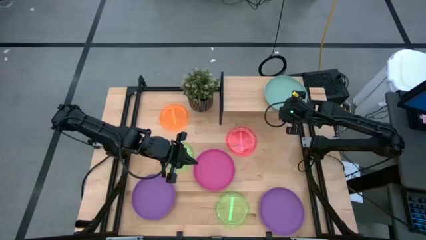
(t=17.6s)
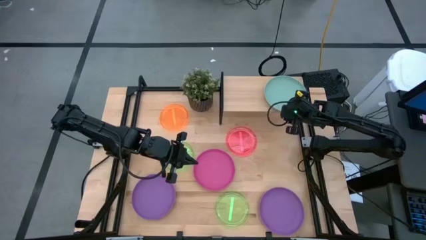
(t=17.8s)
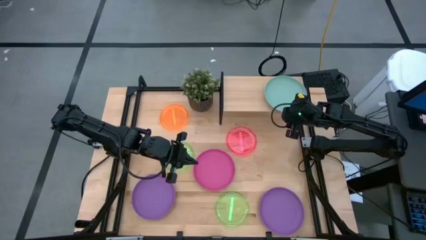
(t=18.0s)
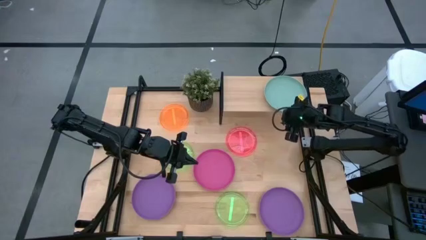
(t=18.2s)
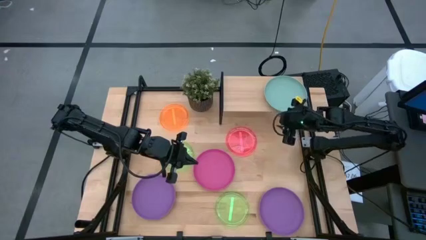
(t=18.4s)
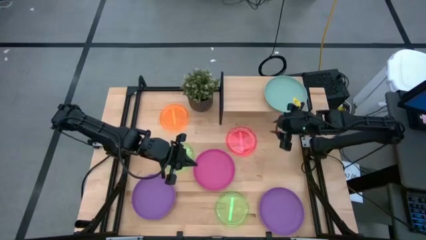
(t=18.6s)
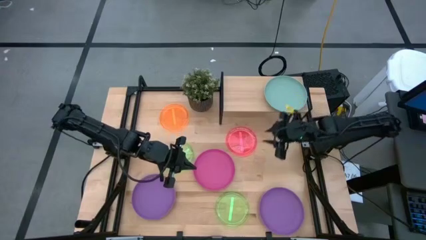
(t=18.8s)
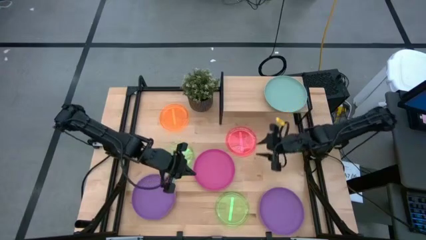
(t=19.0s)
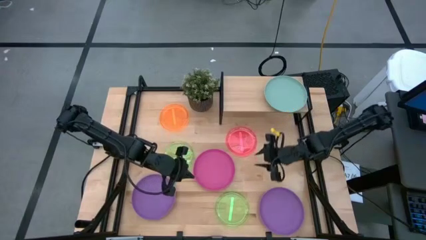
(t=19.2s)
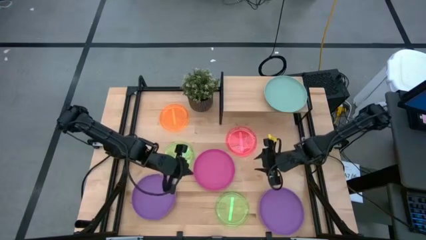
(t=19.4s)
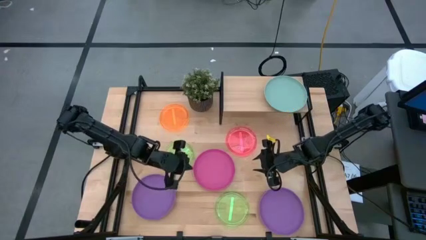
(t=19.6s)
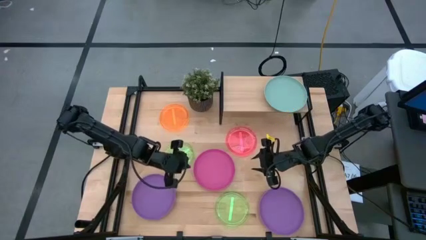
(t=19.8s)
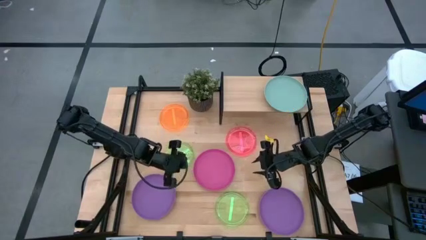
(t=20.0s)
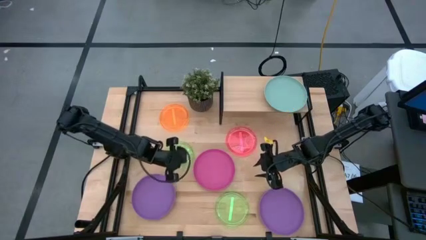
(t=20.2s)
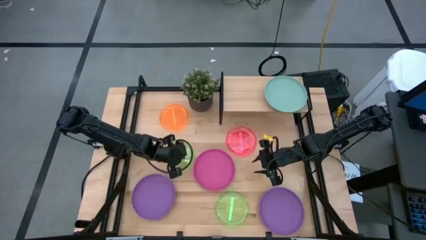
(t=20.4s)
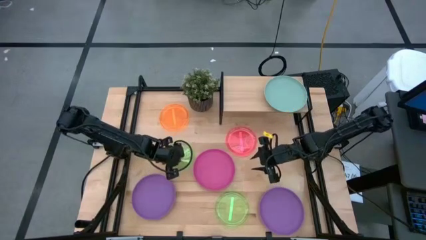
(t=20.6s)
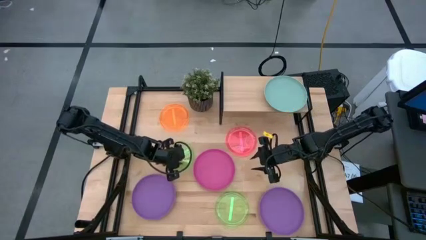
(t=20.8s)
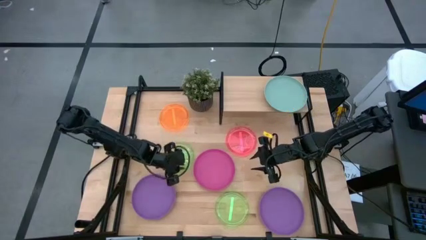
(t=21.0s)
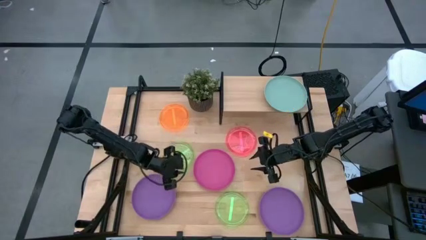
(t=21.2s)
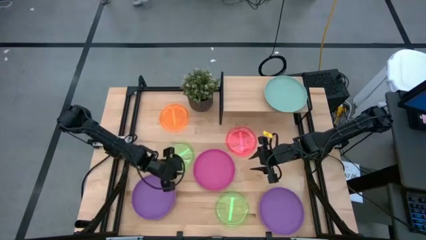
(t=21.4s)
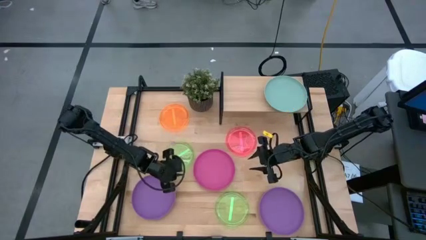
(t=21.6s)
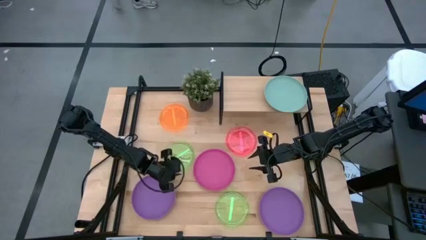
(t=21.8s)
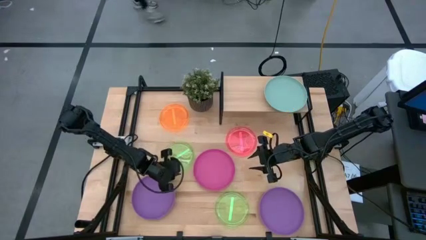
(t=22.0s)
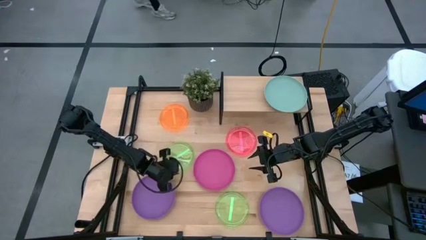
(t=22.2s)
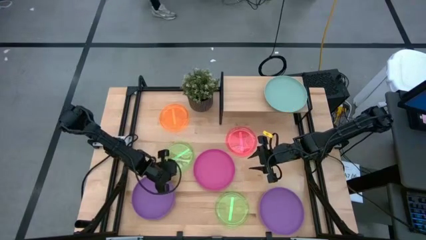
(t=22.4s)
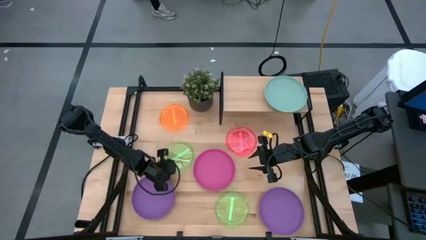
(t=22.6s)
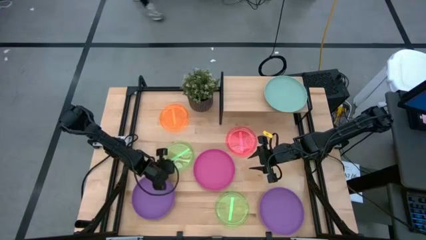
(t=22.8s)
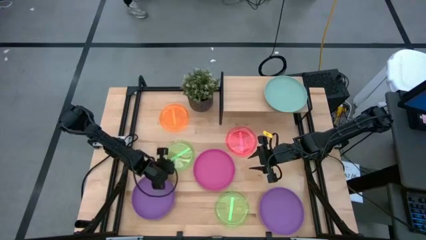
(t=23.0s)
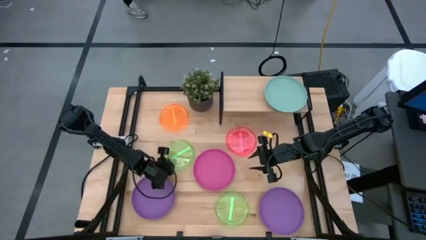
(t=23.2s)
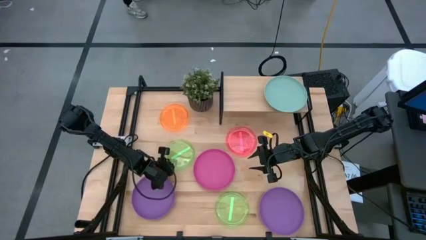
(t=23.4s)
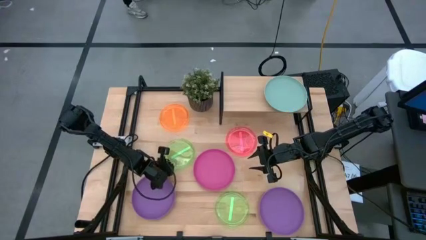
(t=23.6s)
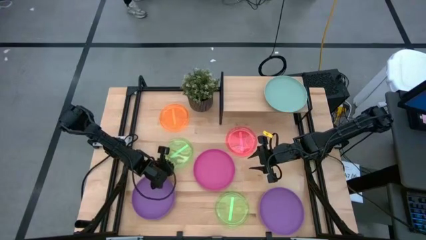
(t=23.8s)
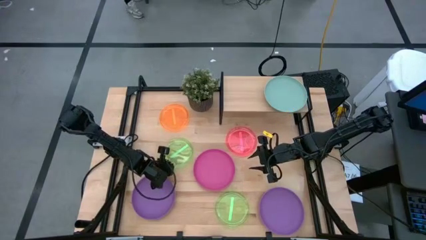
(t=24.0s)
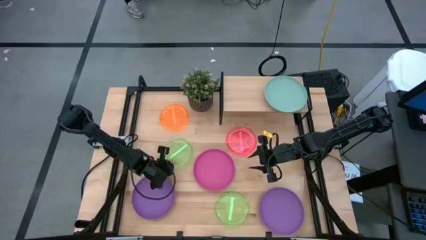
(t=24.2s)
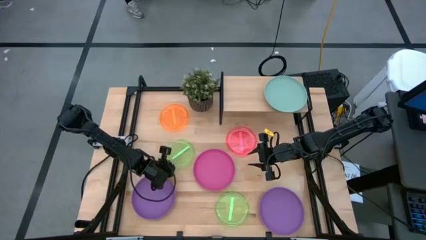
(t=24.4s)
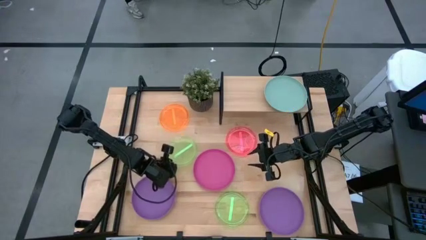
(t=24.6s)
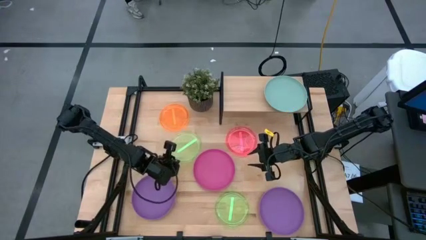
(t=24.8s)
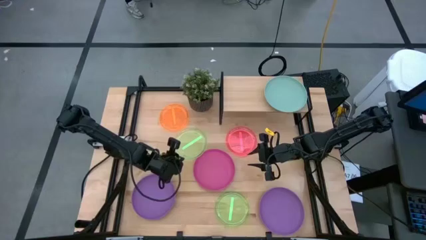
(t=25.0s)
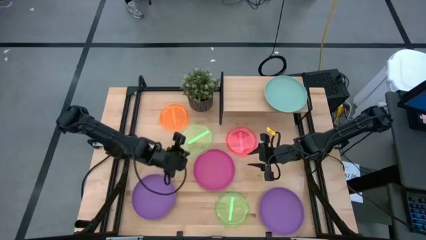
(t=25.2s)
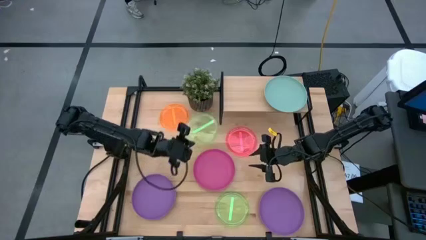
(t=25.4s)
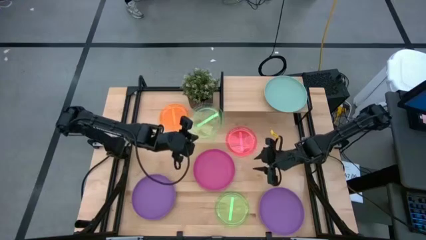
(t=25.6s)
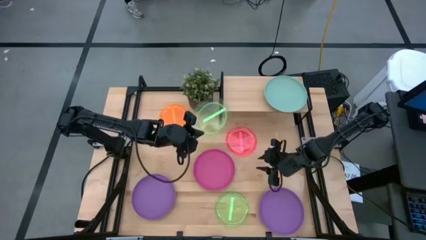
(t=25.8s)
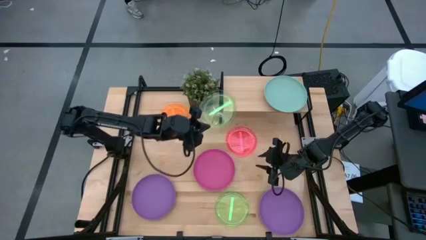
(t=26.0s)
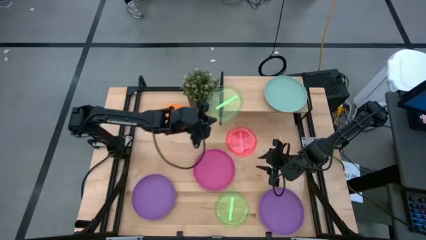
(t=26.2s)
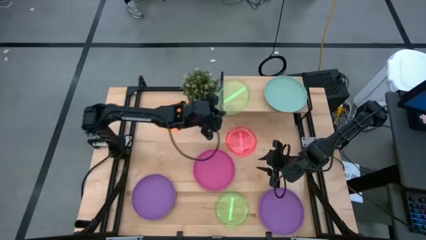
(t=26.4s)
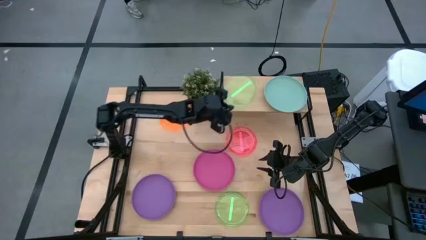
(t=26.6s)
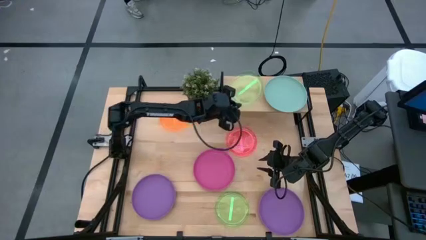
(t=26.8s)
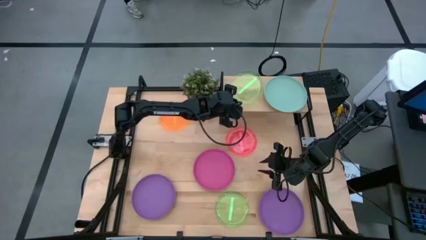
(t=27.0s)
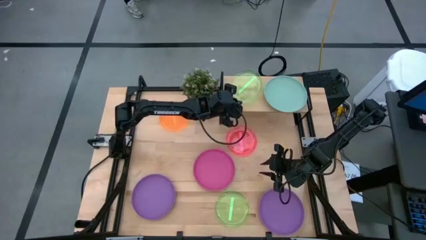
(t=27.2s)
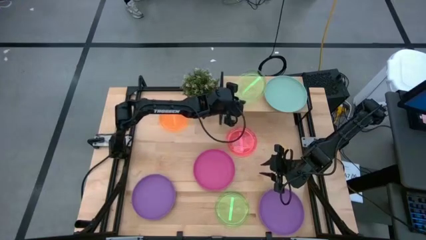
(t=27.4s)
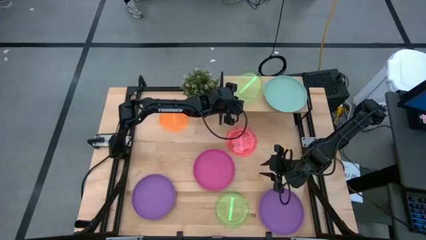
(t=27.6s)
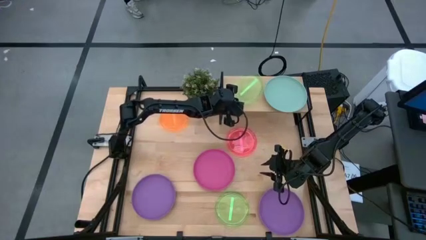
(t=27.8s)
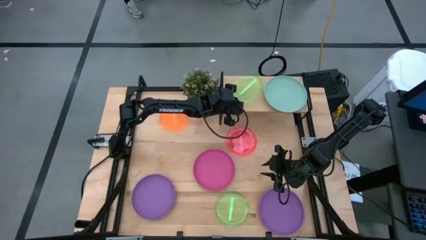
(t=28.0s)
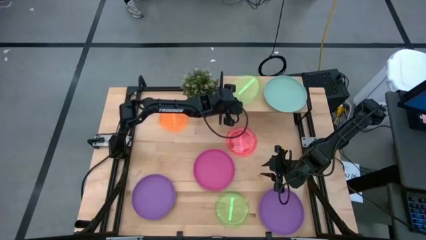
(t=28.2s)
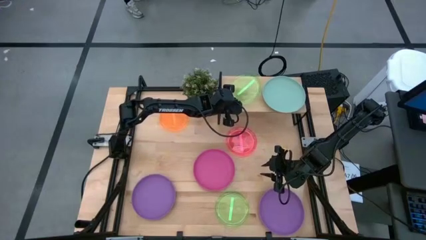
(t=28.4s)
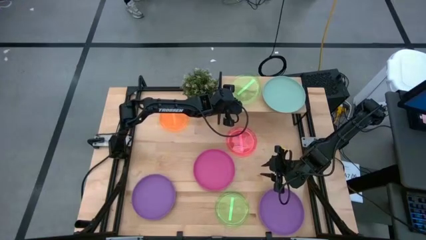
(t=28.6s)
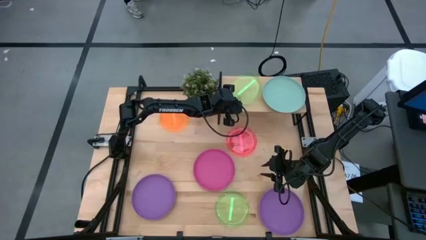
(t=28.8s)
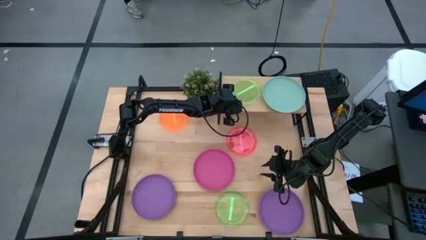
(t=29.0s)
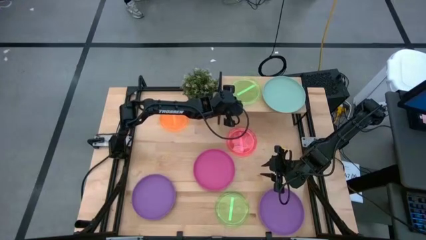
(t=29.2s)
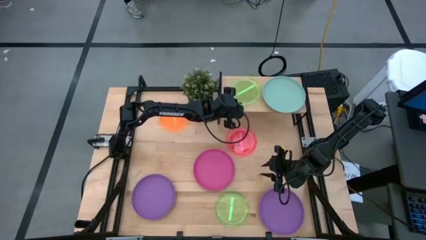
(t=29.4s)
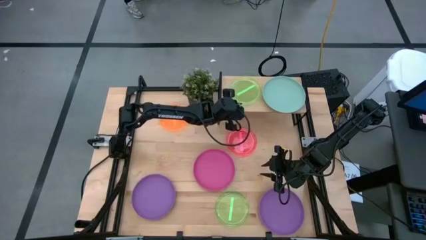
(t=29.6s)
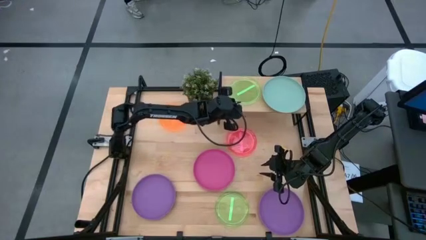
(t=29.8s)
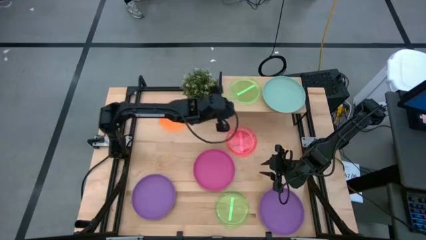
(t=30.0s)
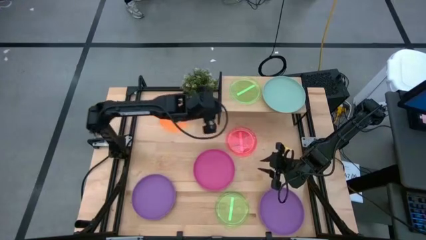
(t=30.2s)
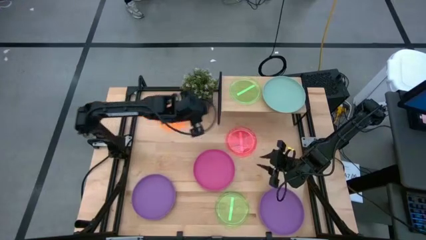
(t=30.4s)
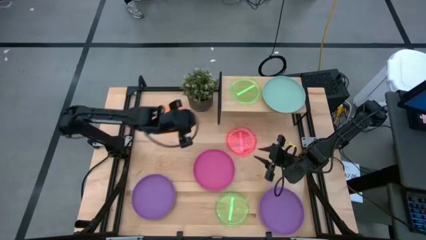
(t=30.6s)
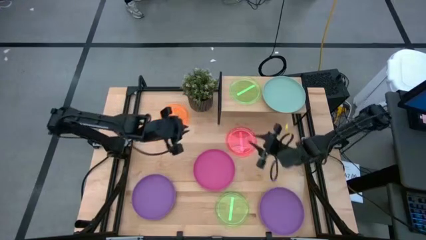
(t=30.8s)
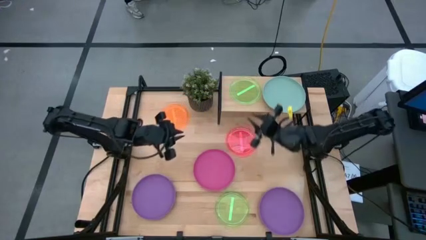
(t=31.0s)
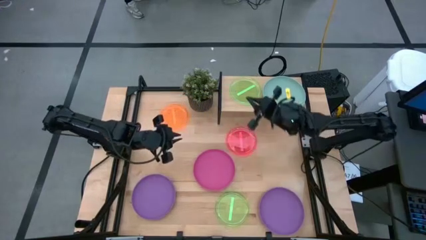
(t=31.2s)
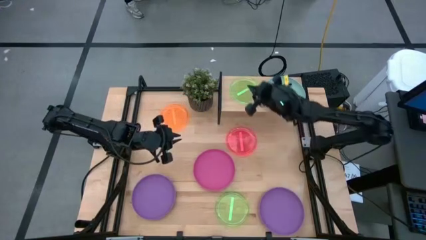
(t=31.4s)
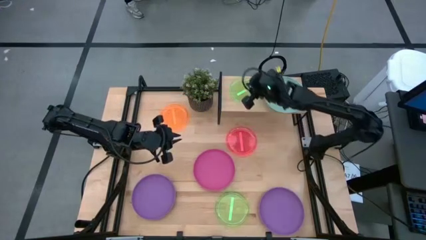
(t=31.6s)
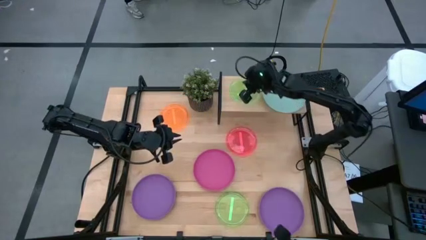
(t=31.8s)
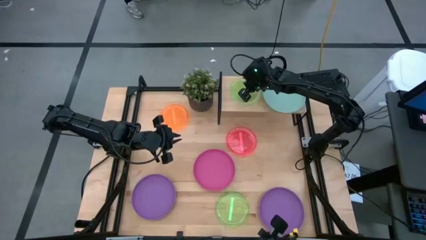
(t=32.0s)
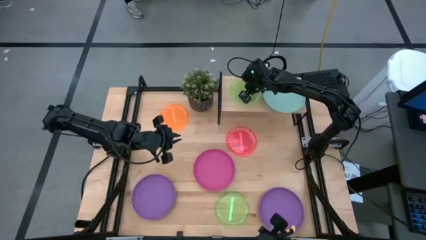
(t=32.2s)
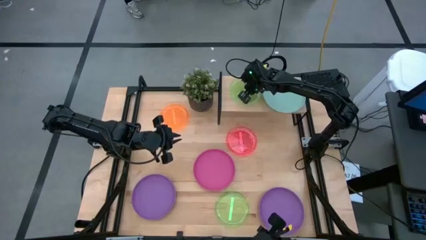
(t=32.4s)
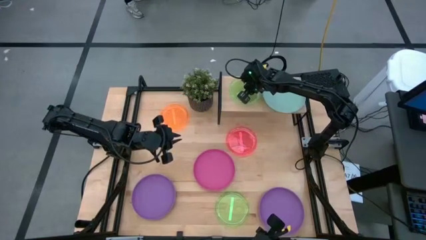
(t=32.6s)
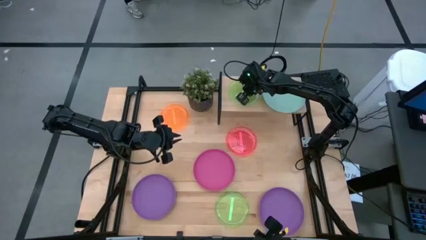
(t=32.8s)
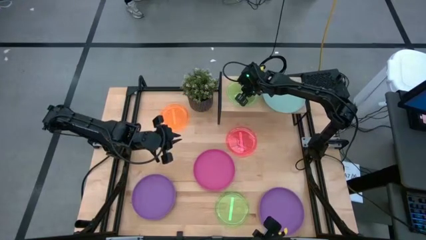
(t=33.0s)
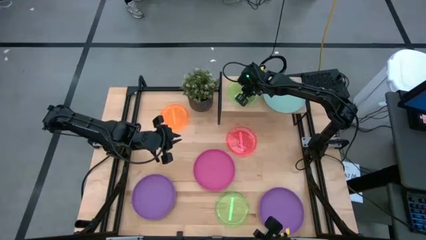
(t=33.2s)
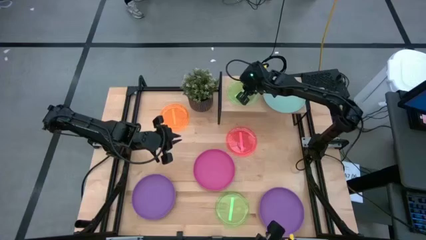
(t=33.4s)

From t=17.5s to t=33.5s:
Task: Place and stack plates onto a shelf
Put the top light green plate on the shelf
